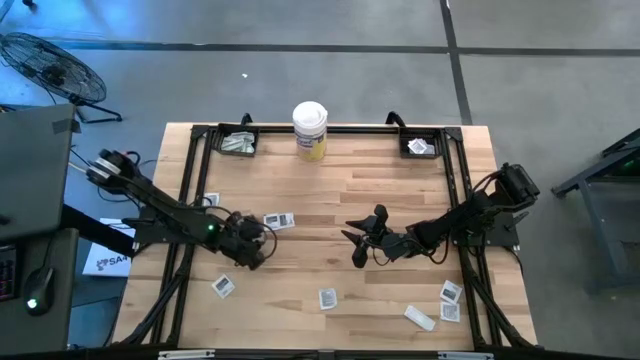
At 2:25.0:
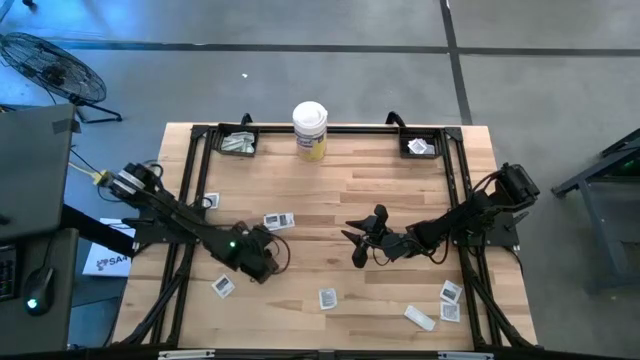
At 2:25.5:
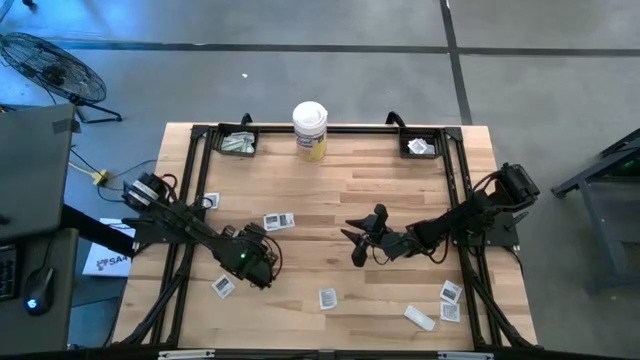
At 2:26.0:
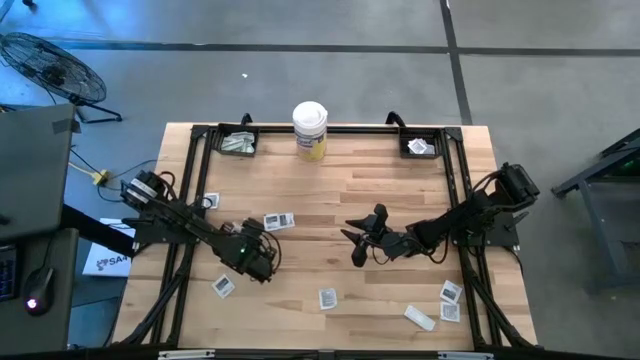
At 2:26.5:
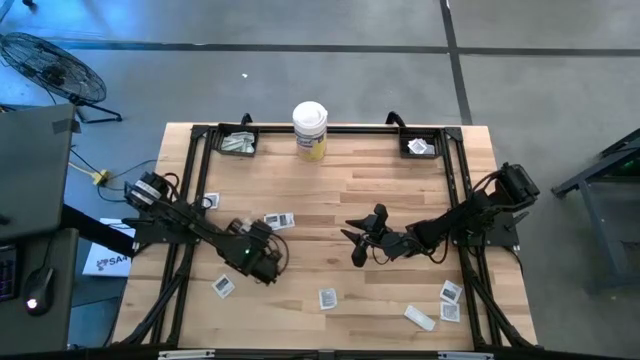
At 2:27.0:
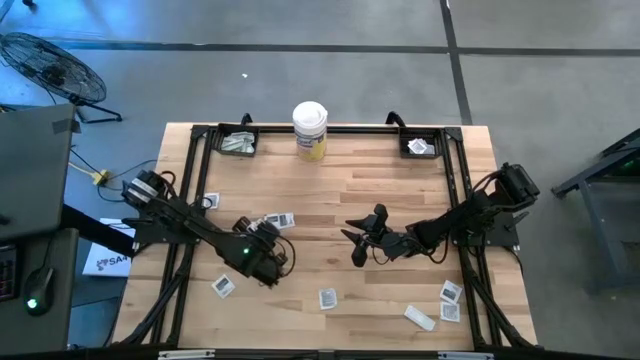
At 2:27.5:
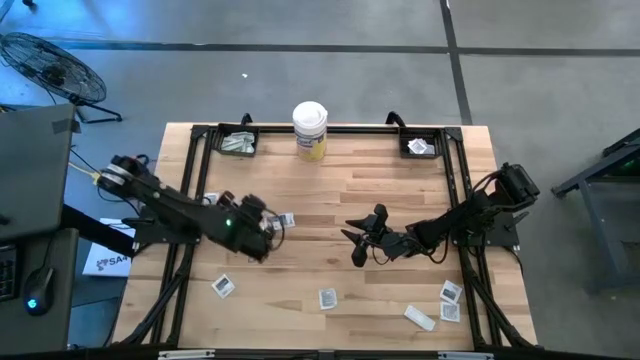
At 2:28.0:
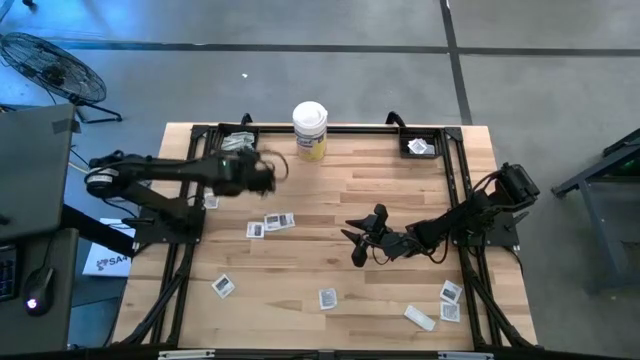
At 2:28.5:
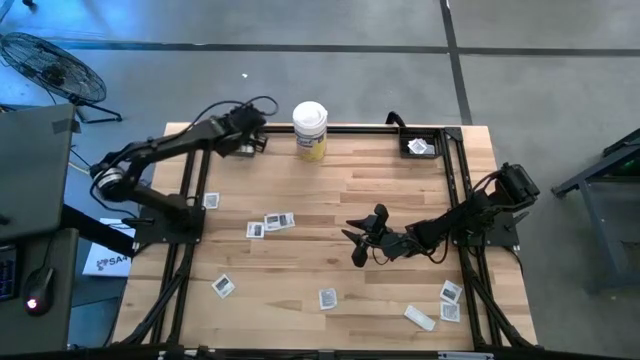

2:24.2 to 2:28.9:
Task: Pick & Place First Aid Supplies
Put the green bandage pack into the left black basket

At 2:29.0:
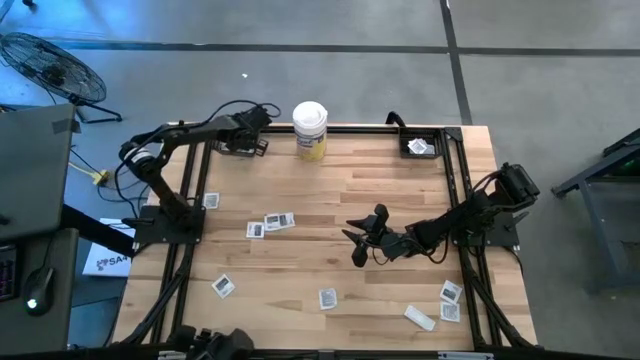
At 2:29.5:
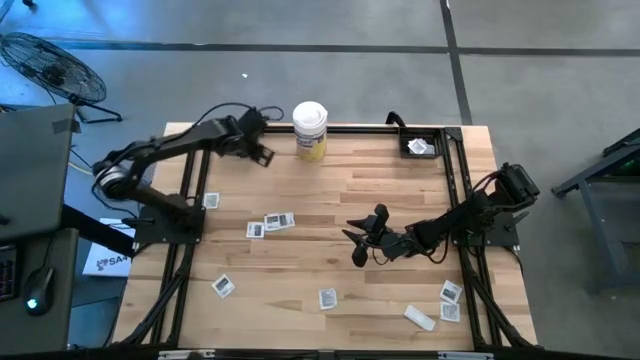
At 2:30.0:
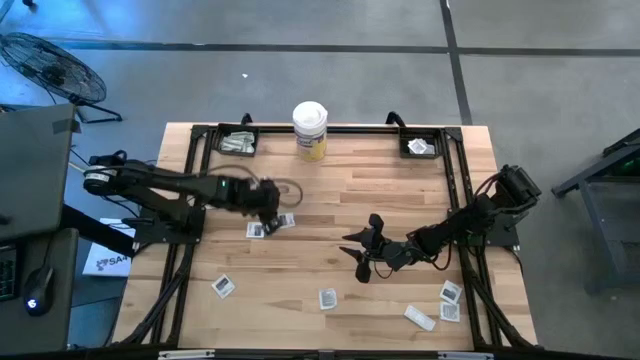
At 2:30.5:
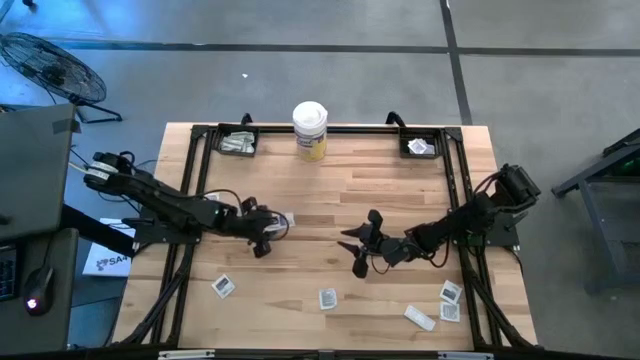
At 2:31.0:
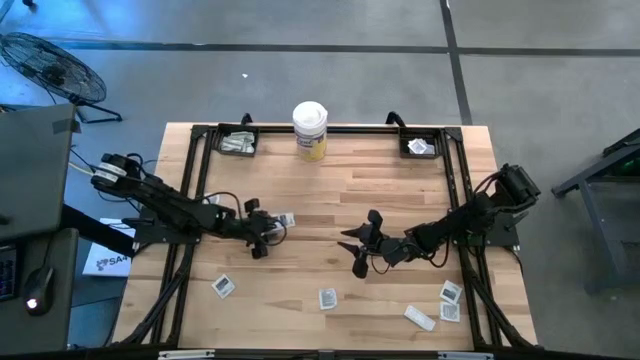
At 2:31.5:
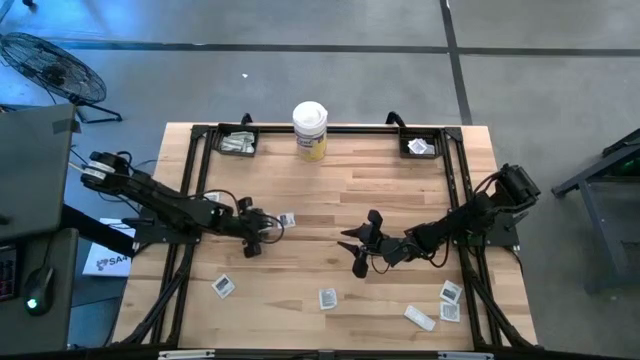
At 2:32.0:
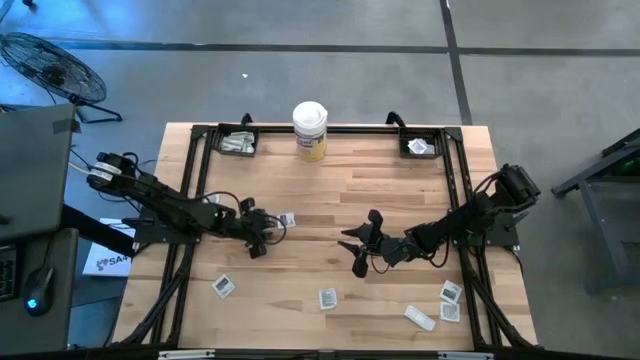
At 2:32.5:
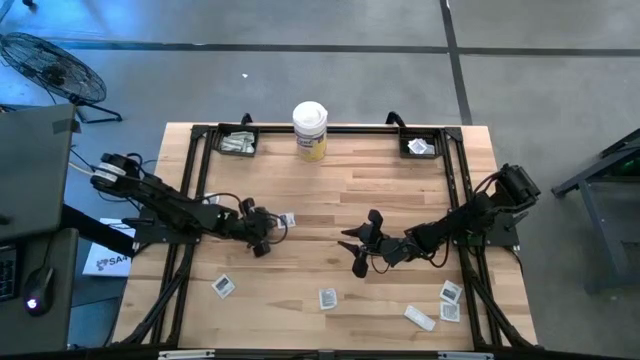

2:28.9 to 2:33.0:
Put the black towelette pack into the right black basket

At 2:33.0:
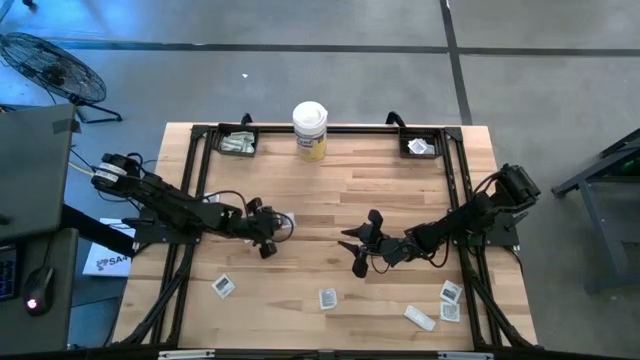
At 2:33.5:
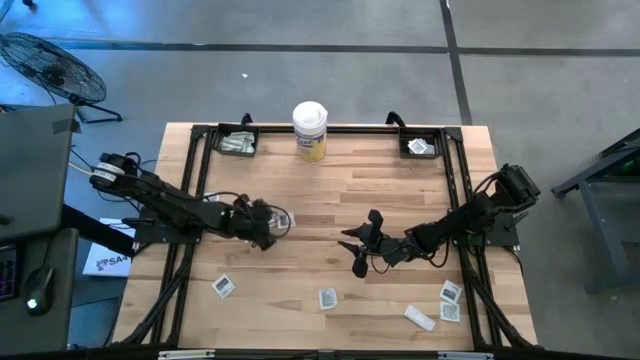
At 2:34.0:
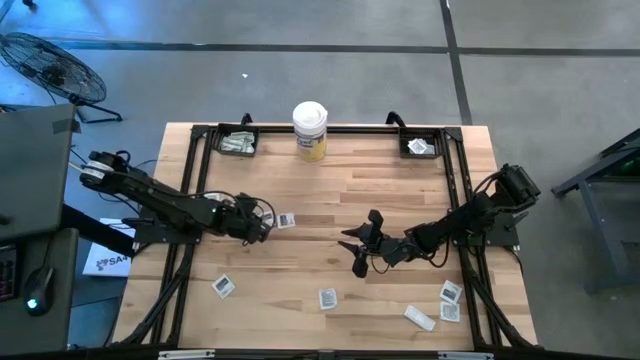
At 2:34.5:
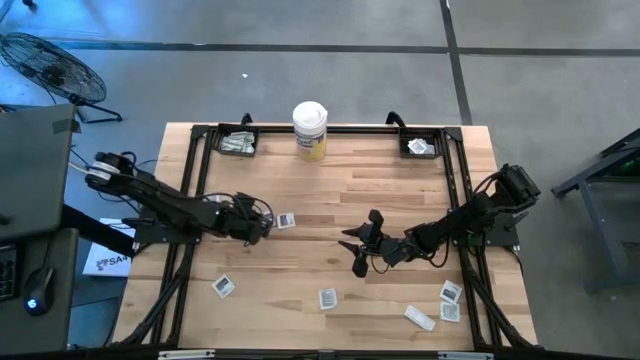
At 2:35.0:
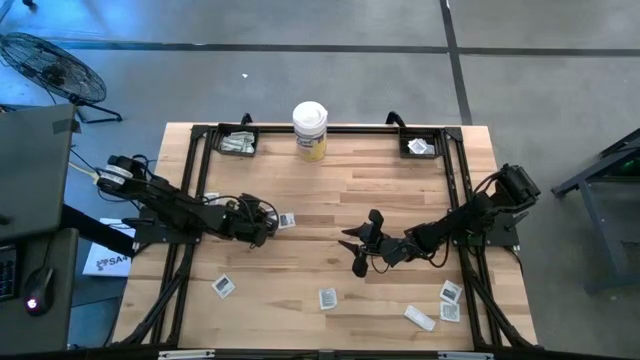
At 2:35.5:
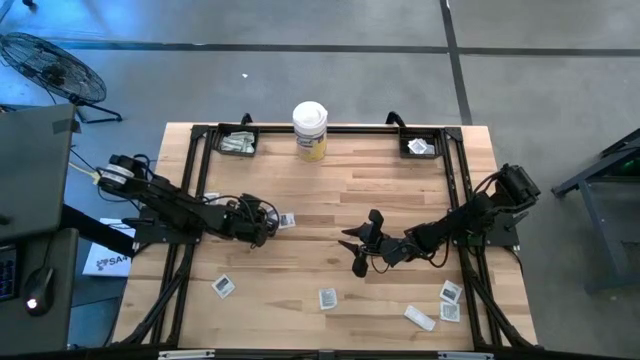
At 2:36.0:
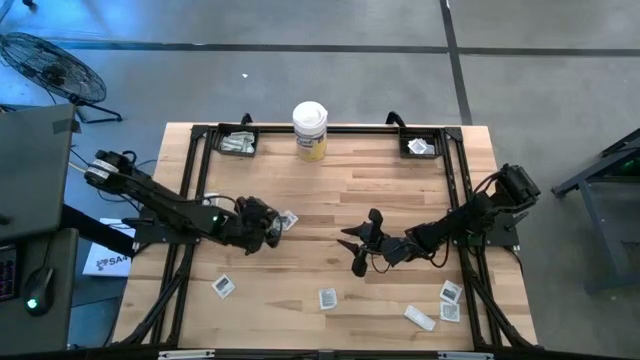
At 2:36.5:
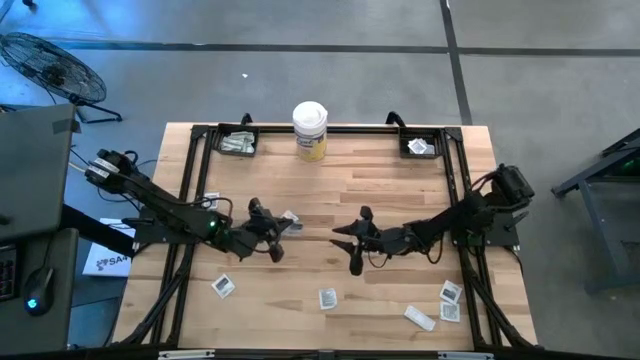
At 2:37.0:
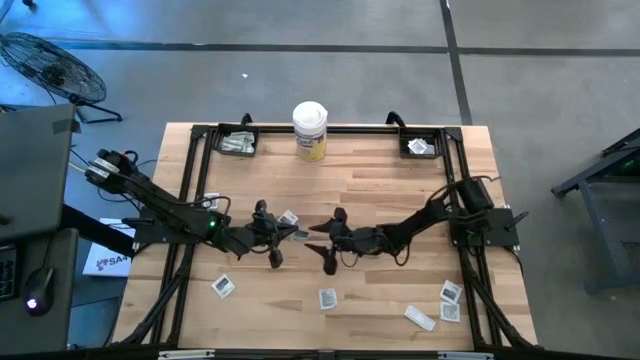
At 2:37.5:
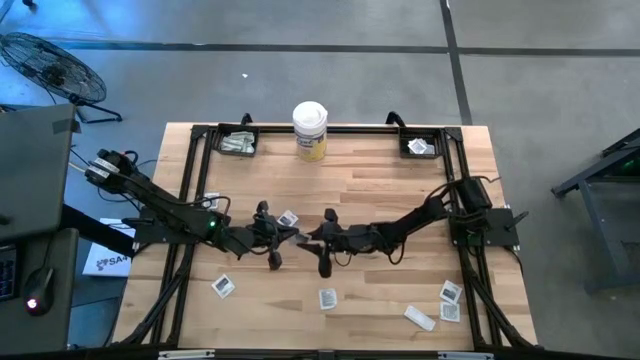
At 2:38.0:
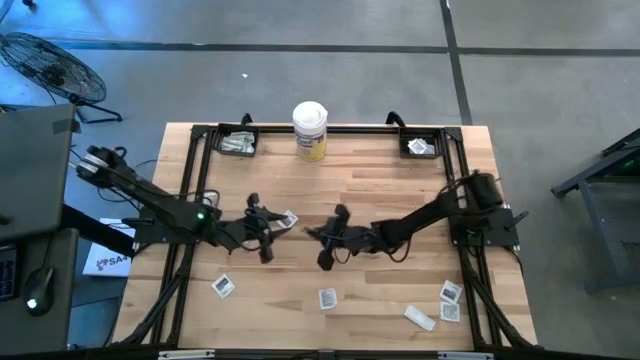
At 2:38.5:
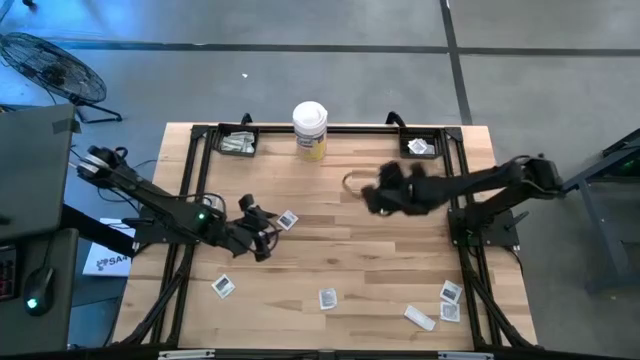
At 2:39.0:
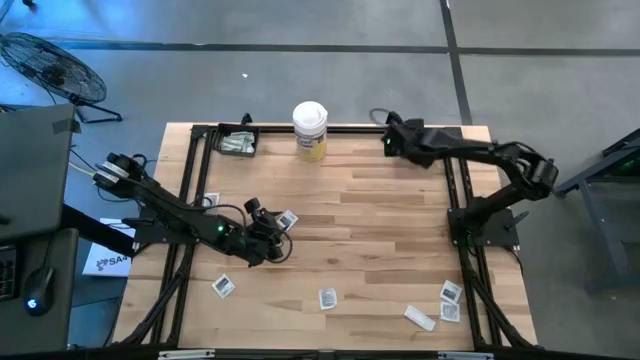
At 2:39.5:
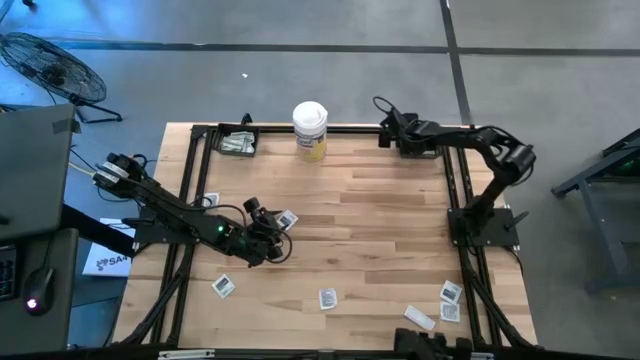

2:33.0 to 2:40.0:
Put the black towelette pack into the right black basket

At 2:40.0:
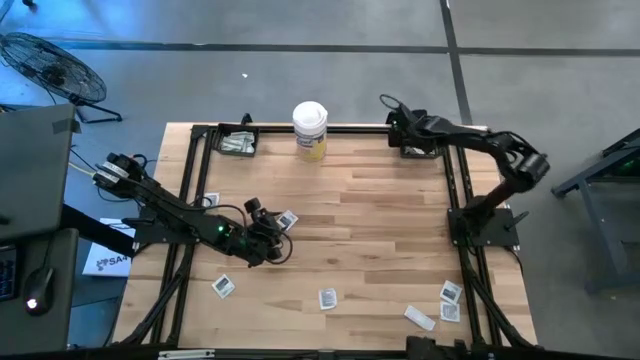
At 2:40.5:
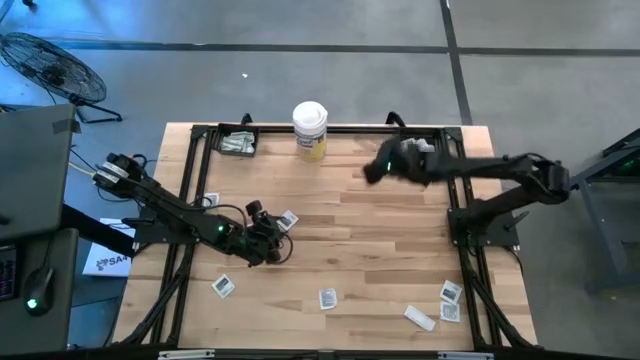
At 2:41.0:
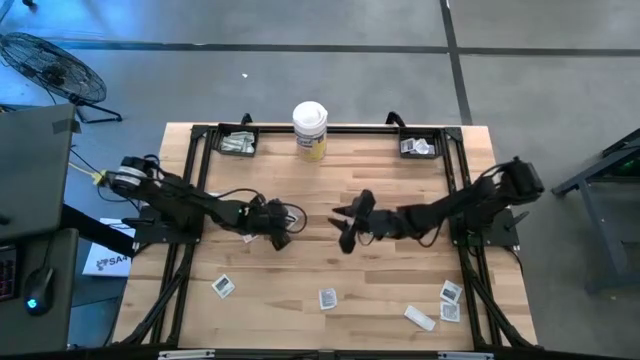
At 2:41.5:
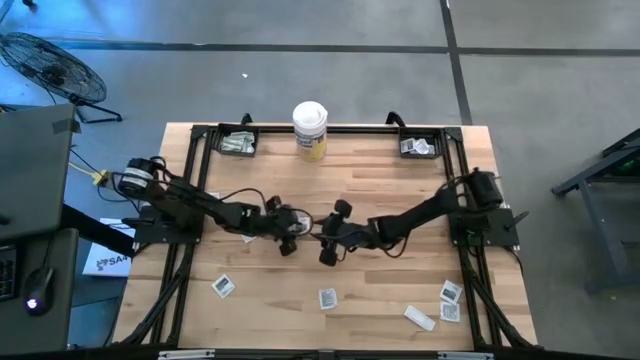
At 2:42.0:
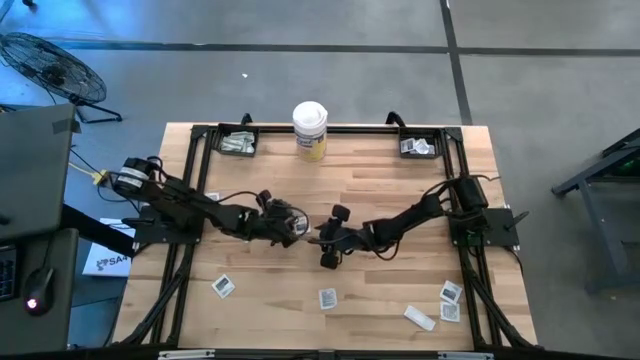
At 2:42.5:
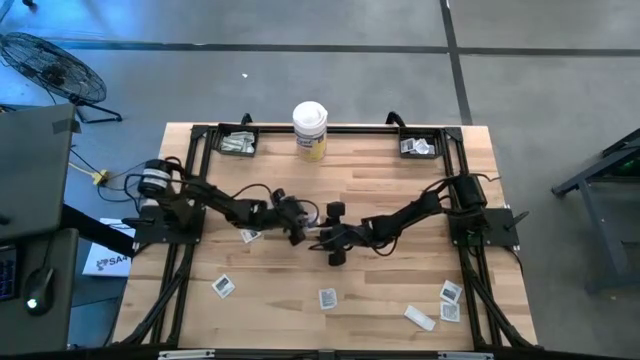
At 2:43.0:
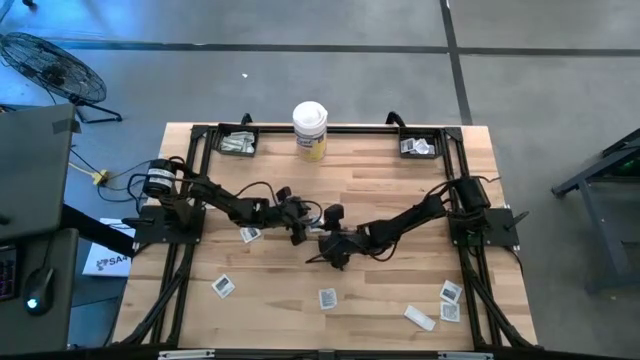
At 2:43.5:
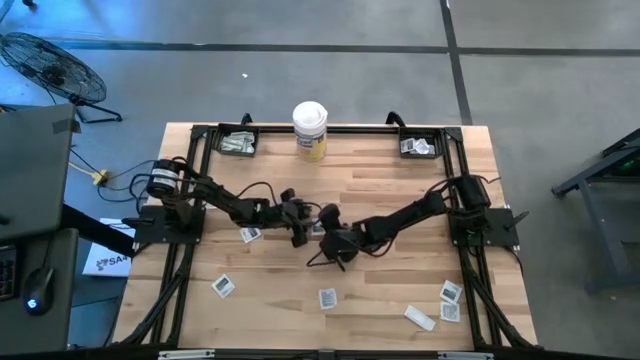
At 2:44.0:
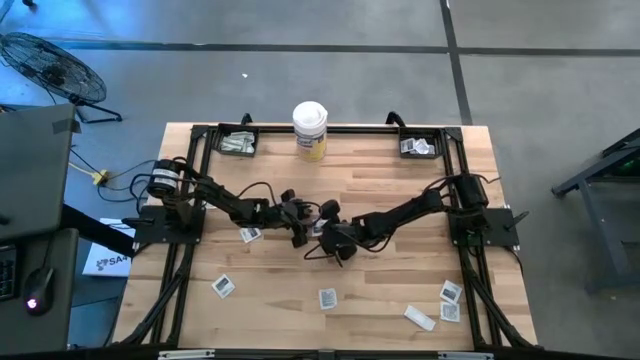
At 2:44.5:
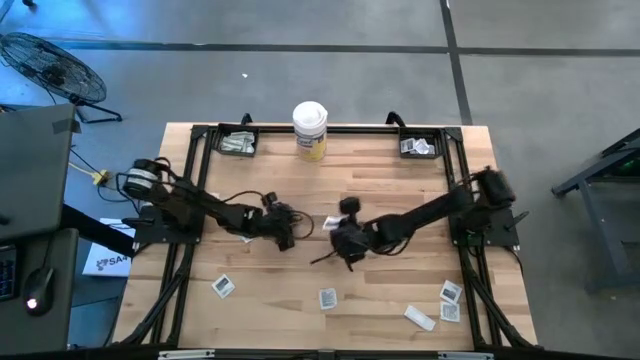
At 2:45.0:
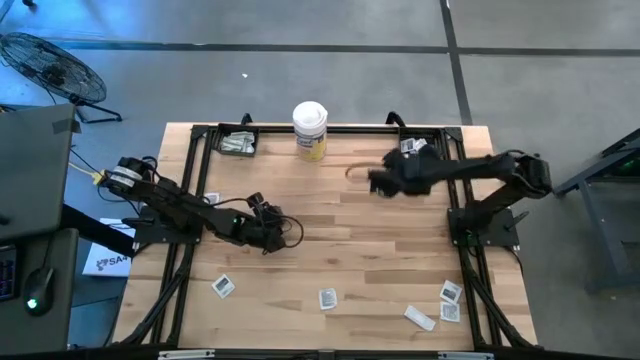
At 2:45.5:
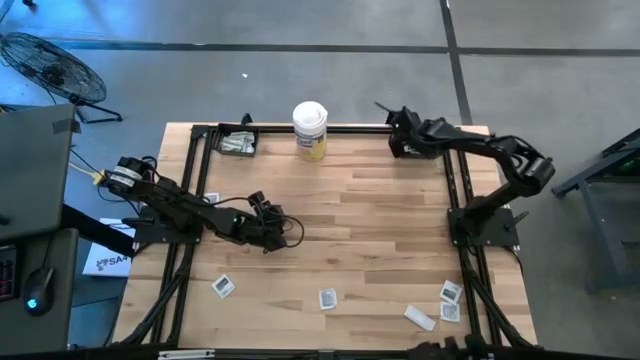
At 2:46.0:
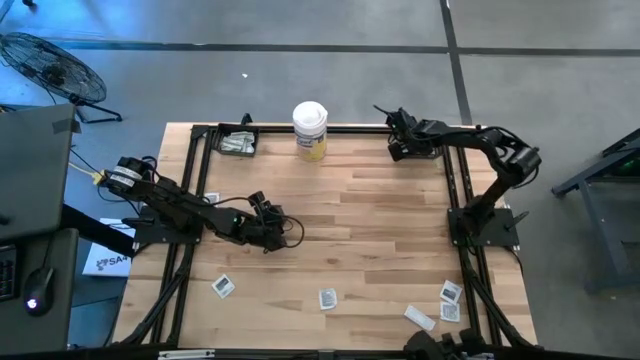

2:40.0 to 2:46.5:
Put the black towelette pack into the right black basket
